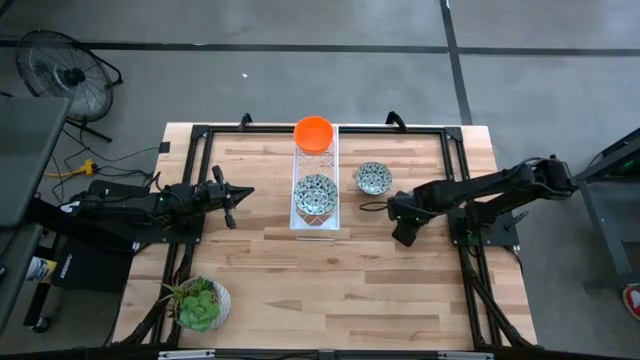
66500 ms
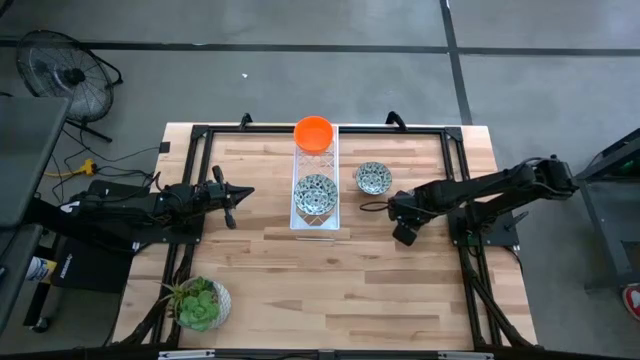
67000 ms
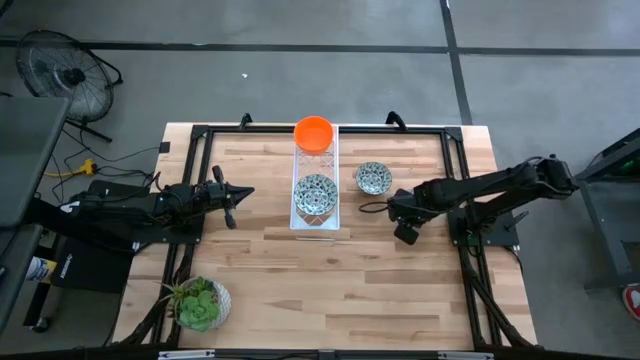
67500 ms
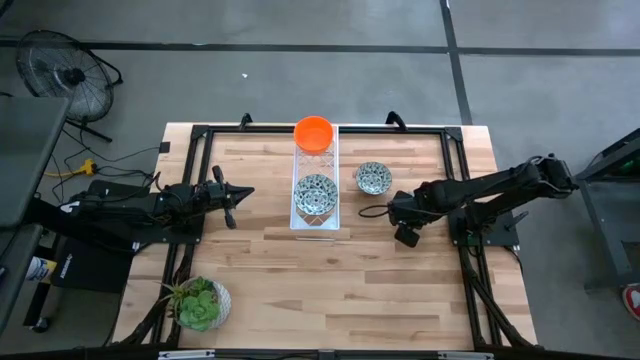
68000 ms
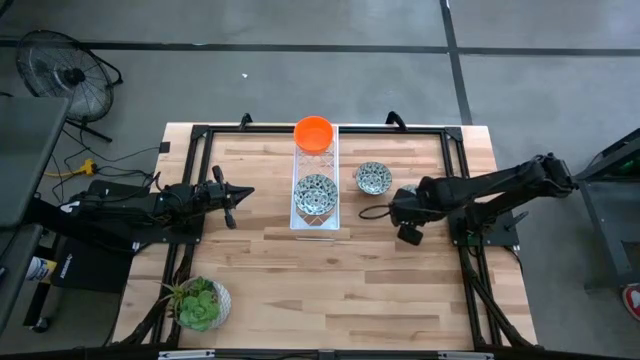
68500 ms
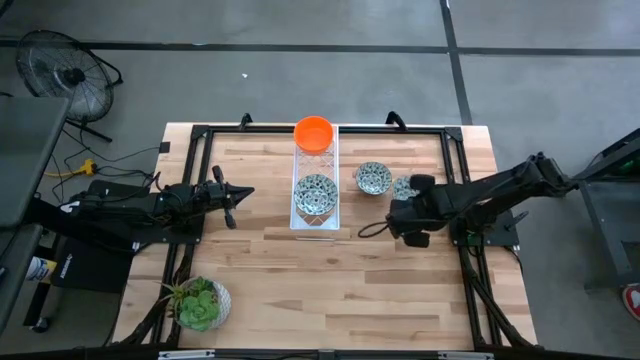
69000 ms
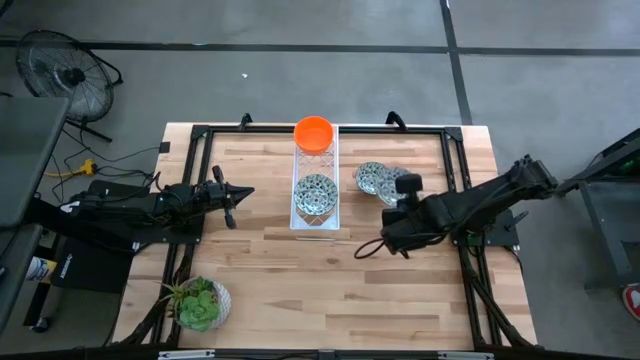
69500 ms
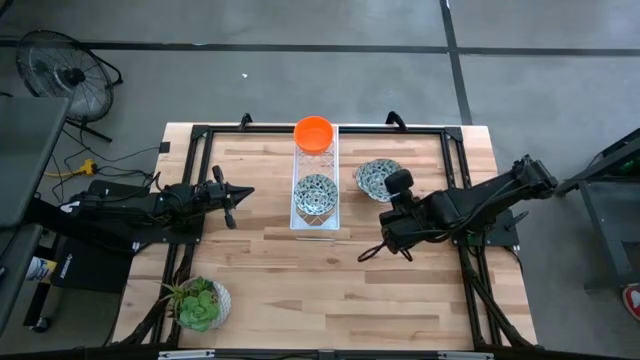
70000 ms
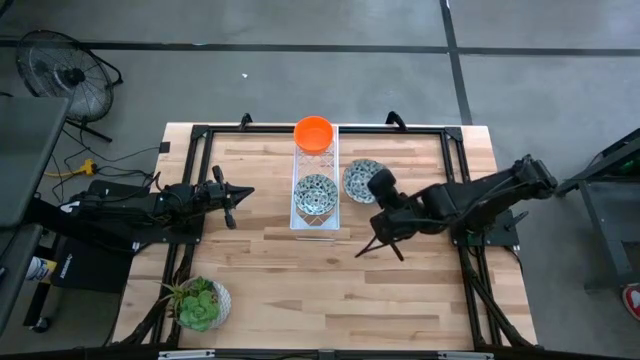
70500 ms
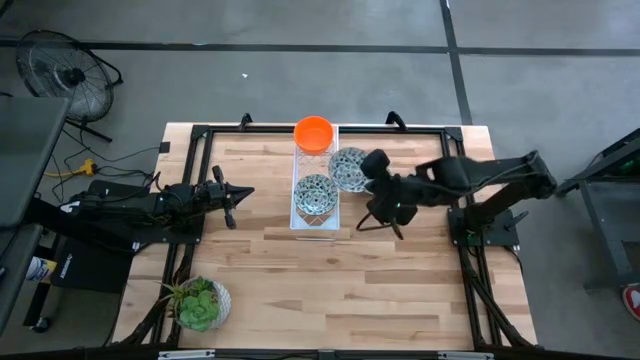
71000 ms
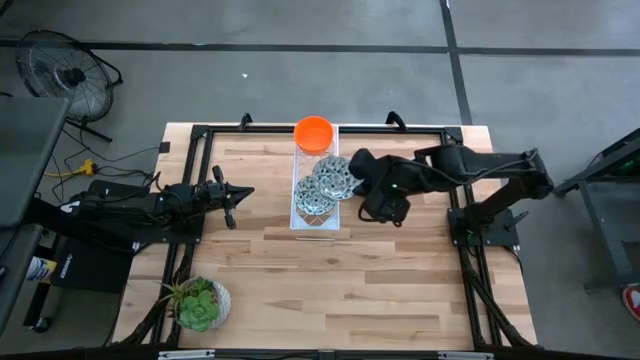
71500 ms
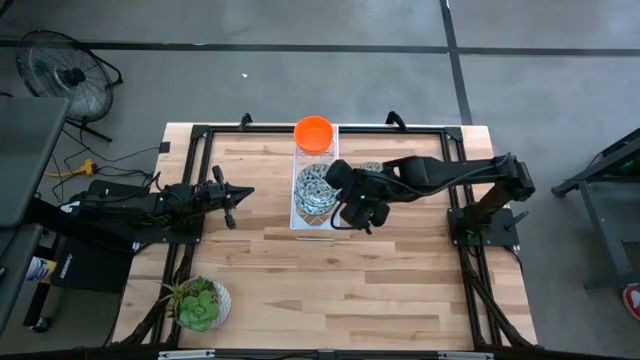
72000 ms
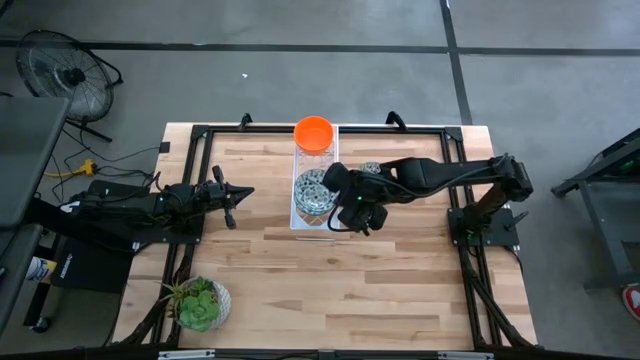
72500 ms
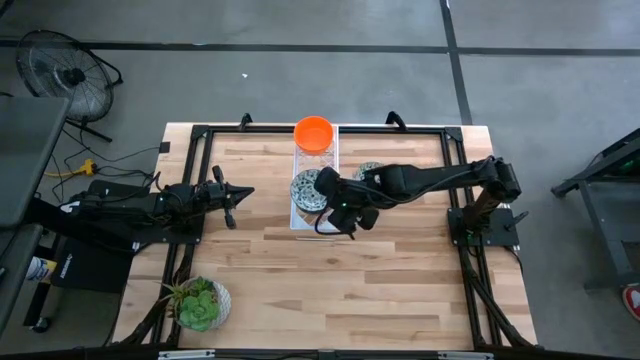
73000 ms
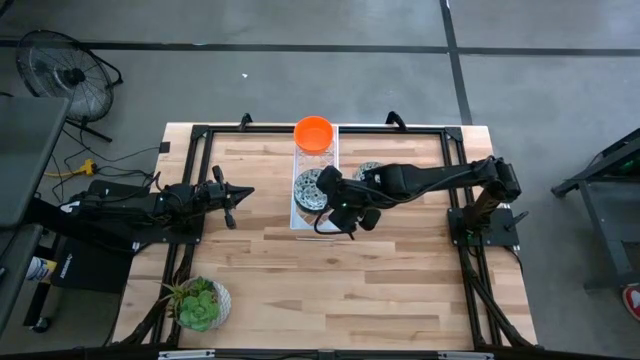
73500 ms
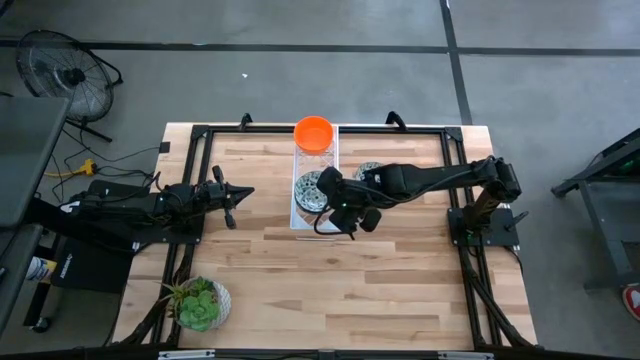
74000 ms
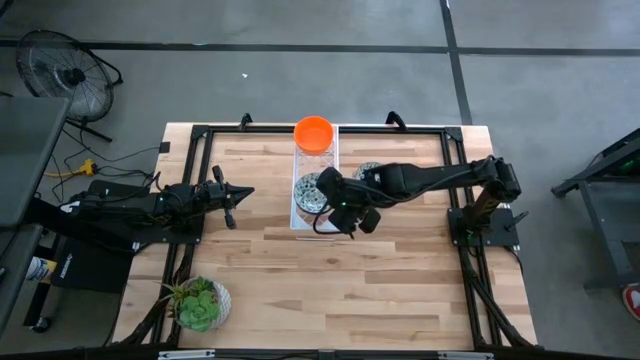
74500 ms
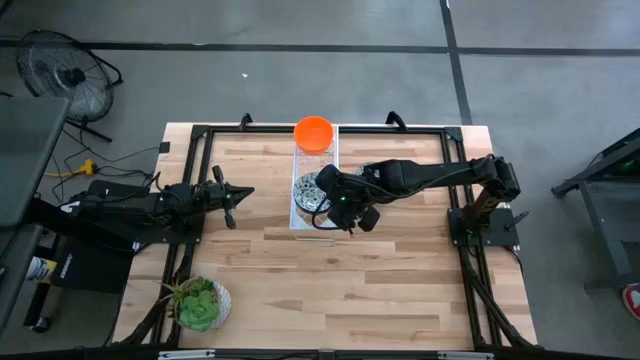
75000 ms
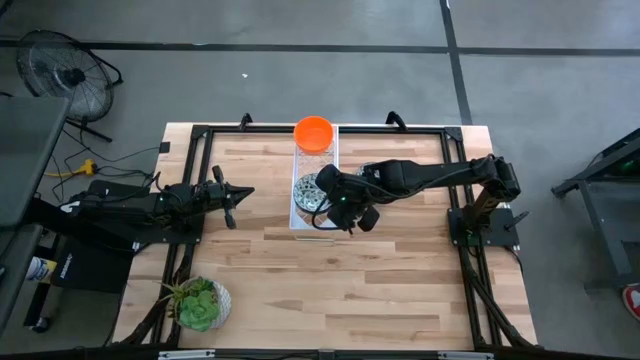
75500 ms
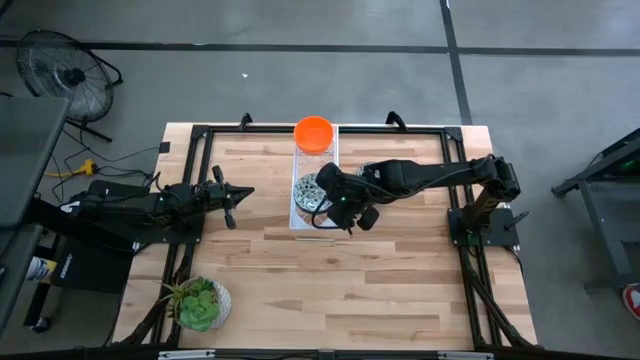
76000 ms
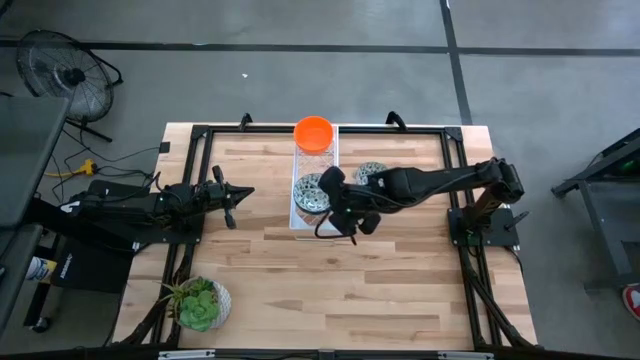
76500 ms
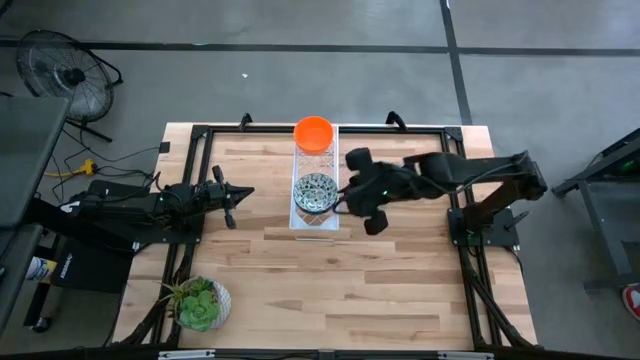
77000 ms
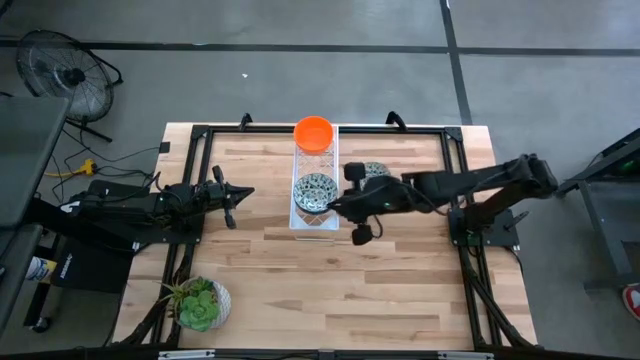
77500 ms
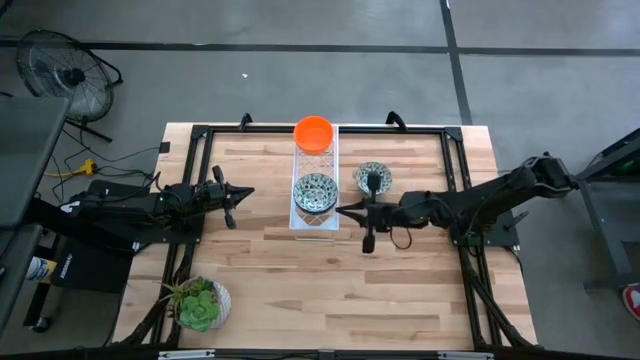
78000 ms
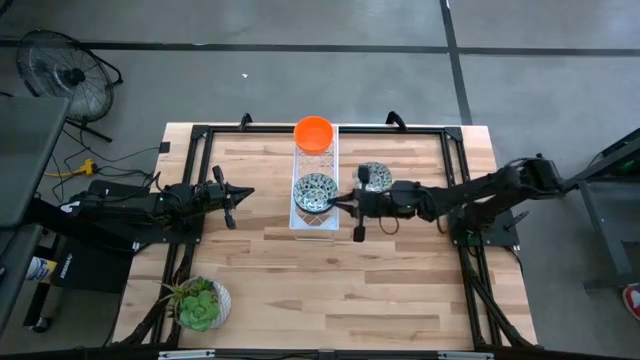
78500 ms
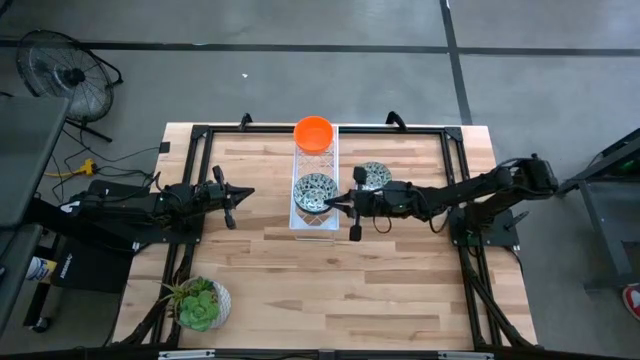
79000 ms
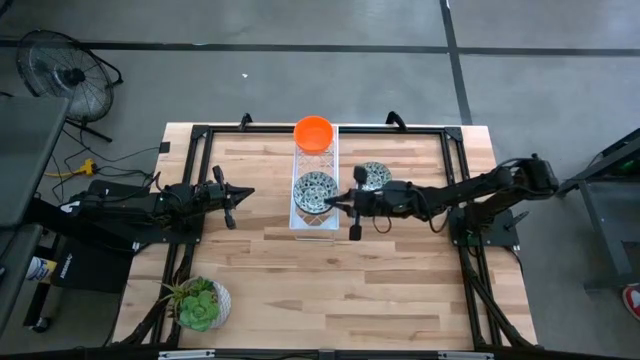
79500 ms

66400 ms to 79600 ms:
Task: Pick & Place Mini bowls
Stack the bottom blue white pattern bowl on top of the other blue white pattern bowl on the shelf

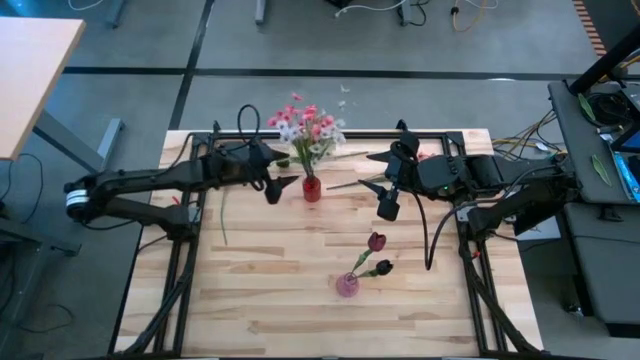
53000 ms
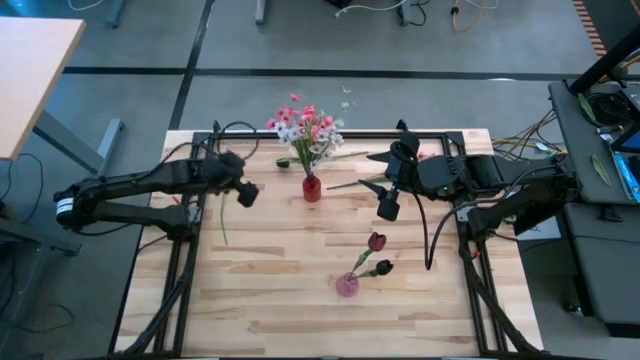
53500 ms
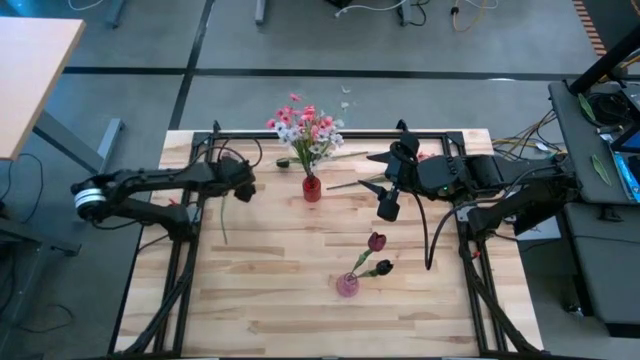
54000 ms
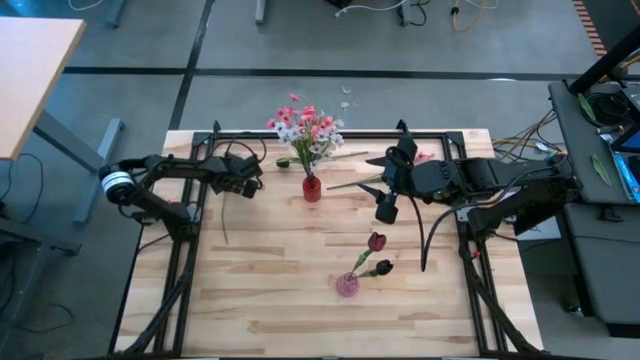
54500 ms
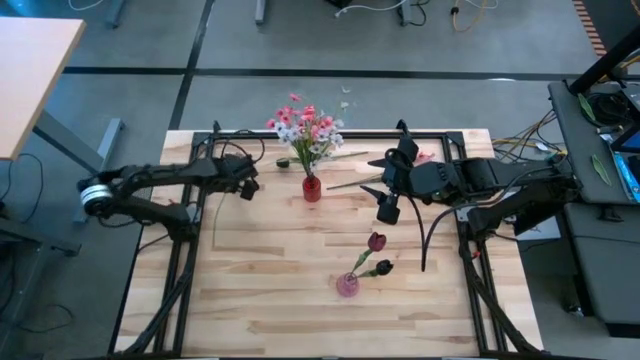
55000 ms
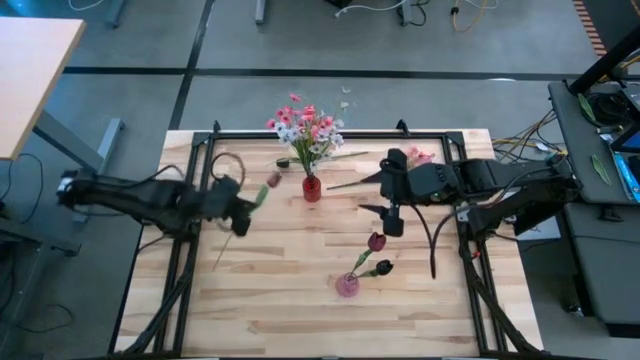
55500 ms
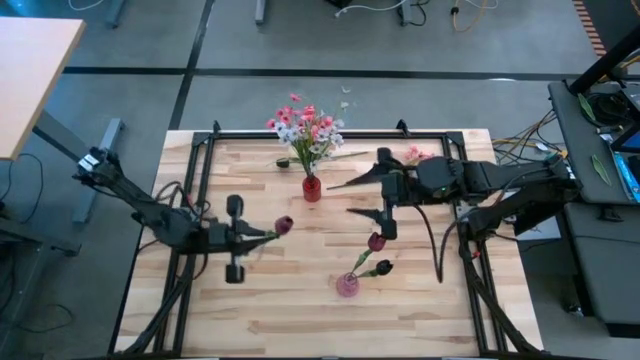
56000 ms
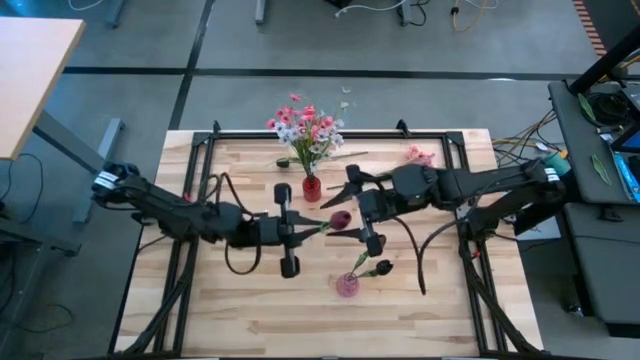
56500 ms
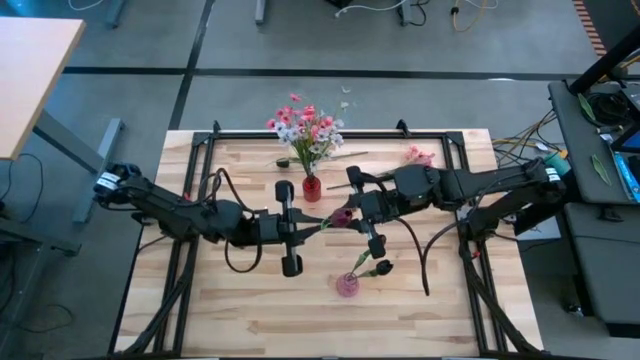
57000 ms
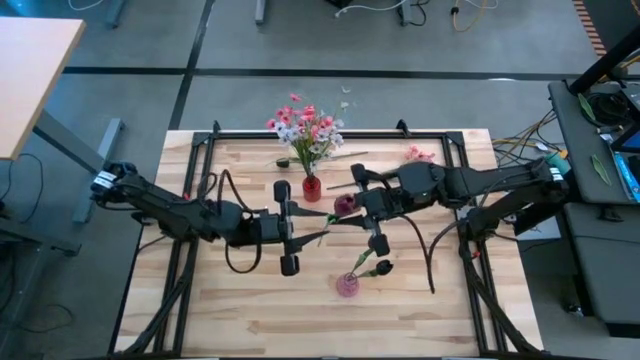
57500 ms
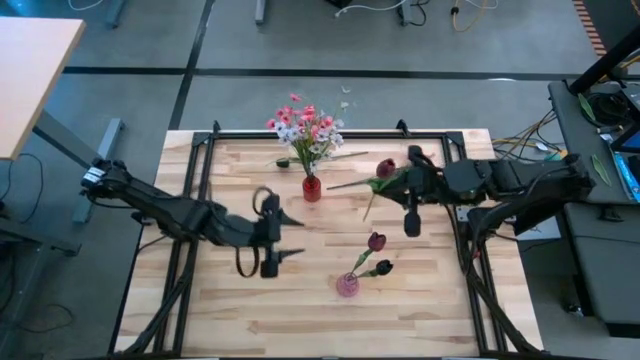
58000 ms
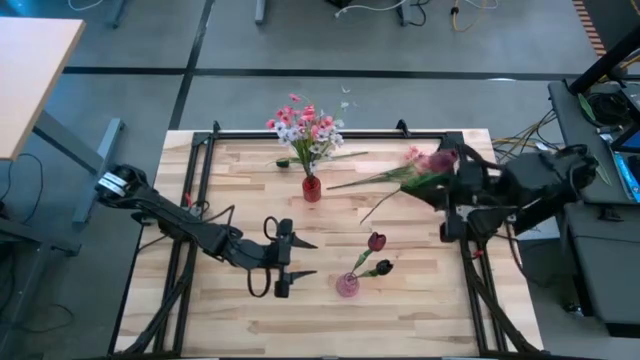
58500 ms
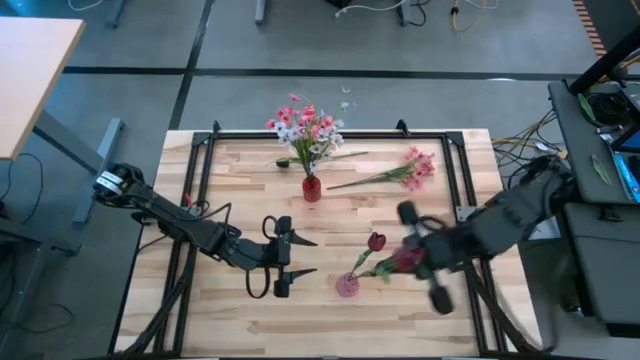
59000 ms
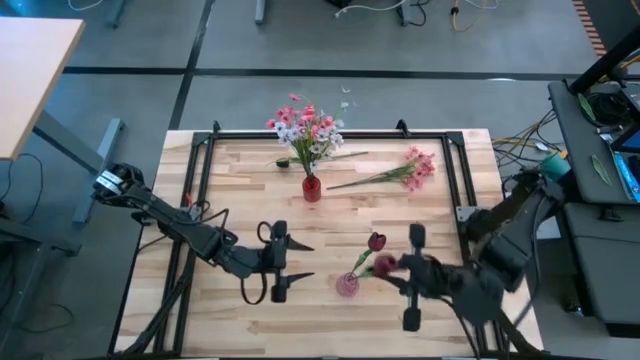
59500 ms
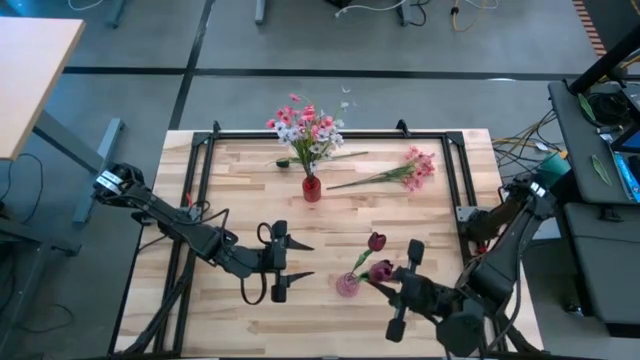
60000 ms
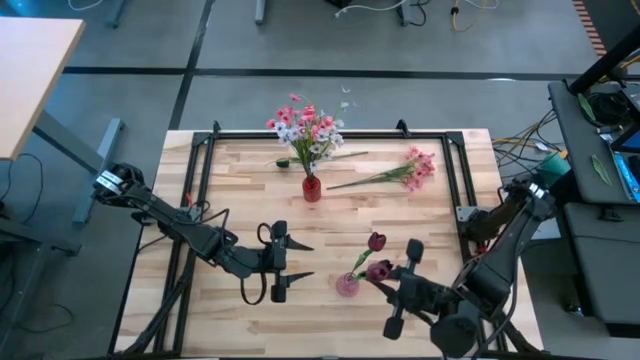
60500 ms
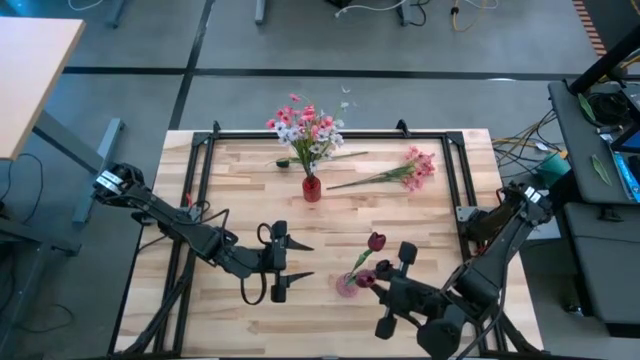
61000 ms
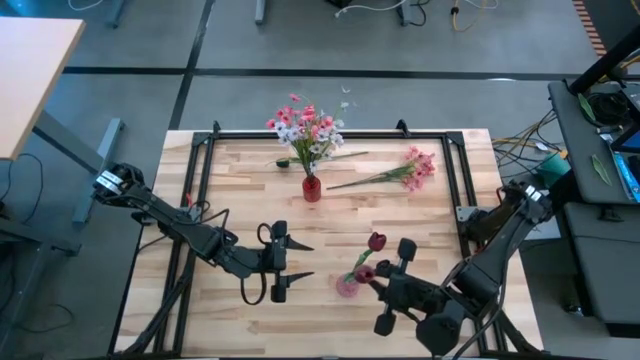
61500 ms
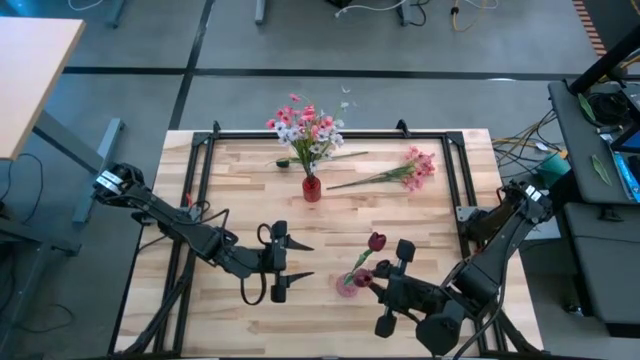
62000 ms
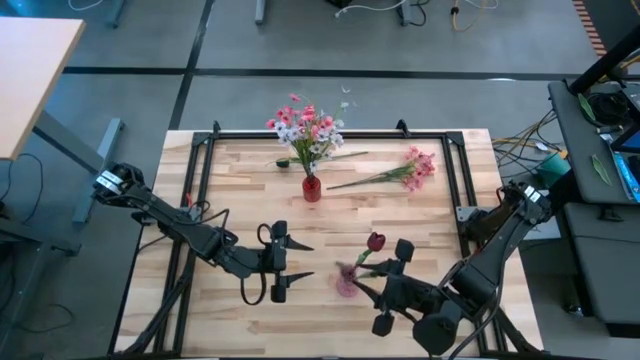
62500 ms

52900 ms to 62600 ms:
Task: Sort flowers into vase by color
Put the purple flower into the purple vase
